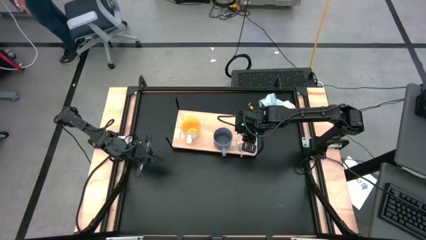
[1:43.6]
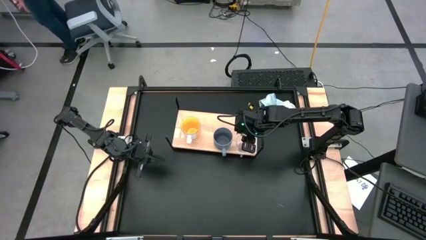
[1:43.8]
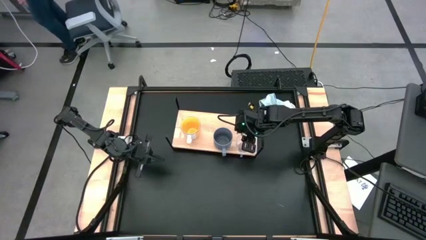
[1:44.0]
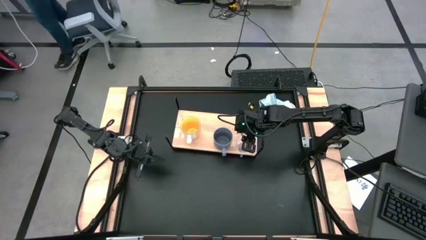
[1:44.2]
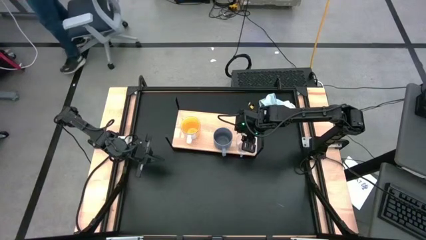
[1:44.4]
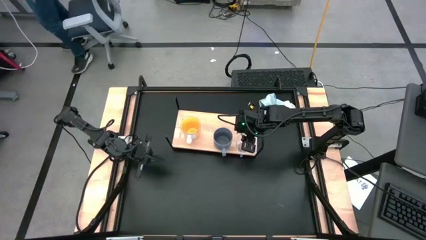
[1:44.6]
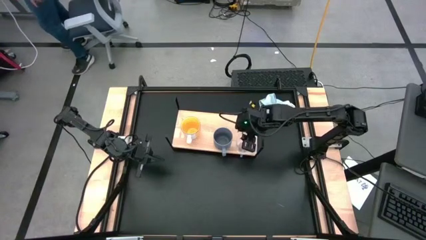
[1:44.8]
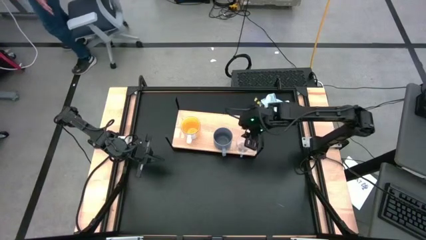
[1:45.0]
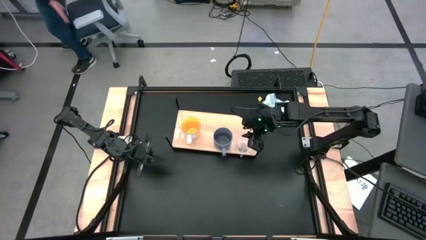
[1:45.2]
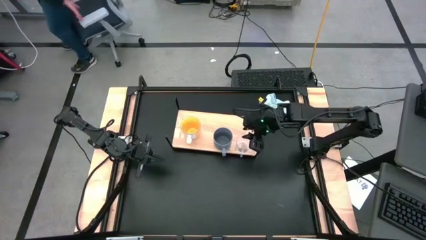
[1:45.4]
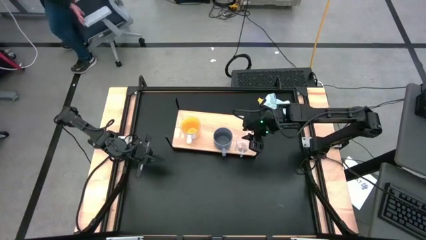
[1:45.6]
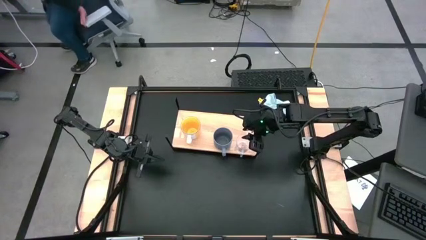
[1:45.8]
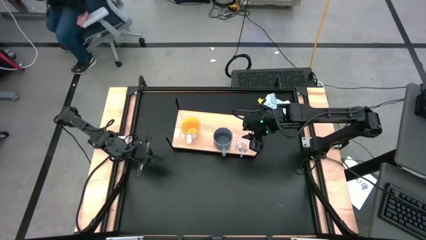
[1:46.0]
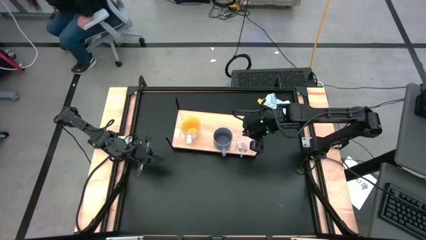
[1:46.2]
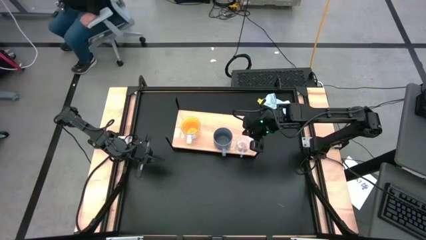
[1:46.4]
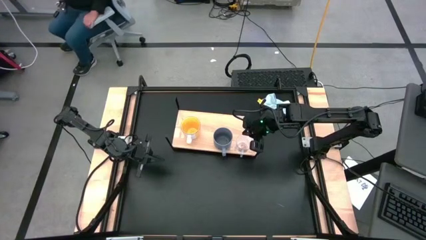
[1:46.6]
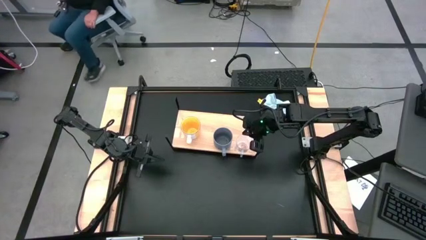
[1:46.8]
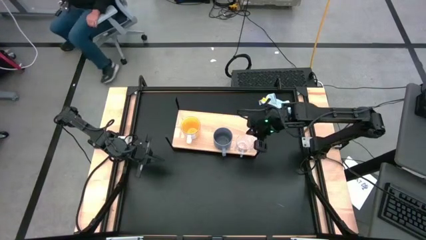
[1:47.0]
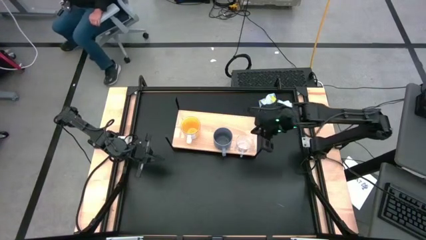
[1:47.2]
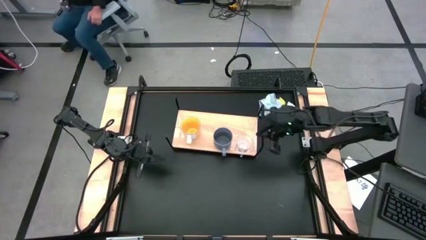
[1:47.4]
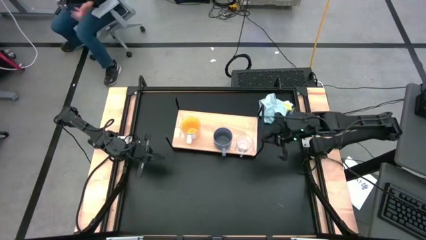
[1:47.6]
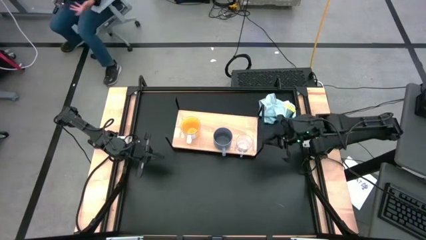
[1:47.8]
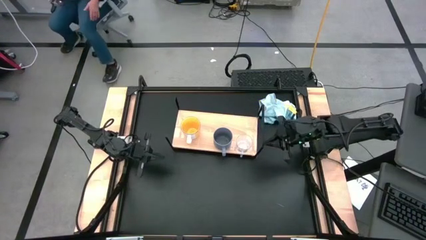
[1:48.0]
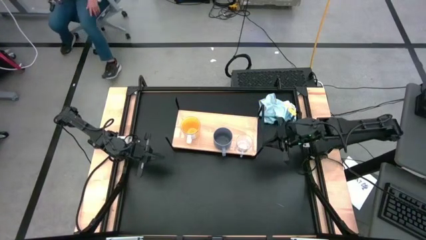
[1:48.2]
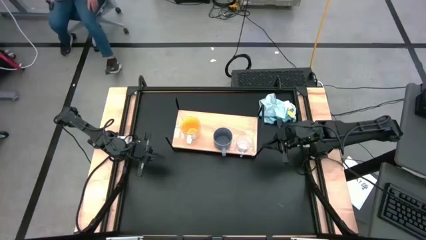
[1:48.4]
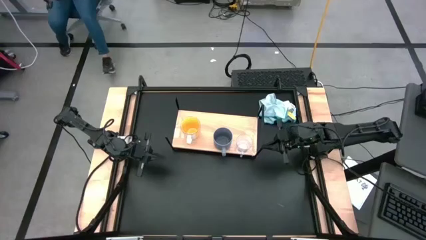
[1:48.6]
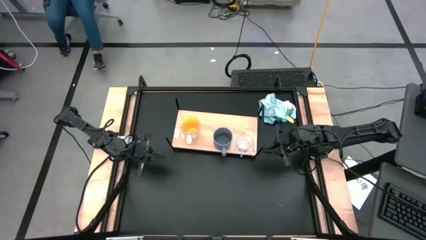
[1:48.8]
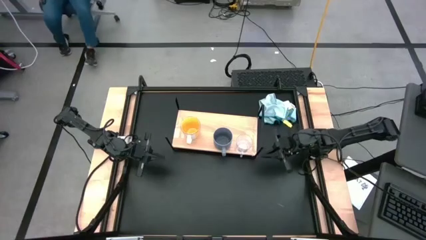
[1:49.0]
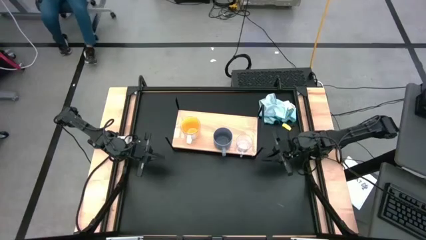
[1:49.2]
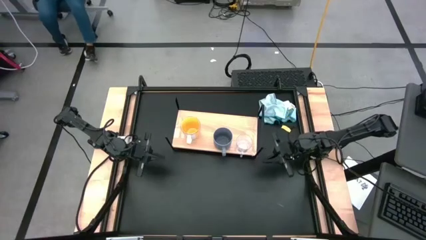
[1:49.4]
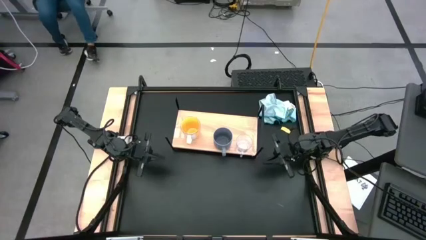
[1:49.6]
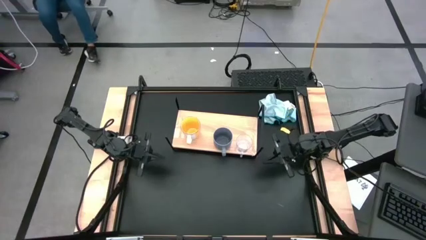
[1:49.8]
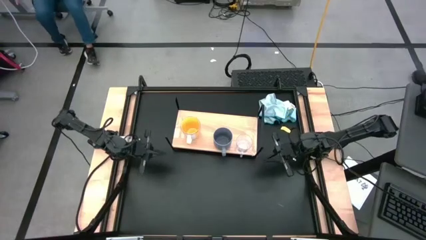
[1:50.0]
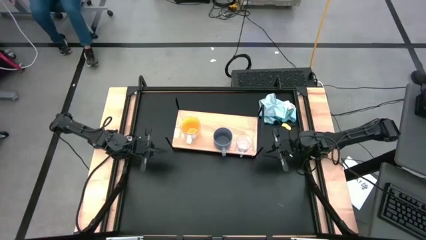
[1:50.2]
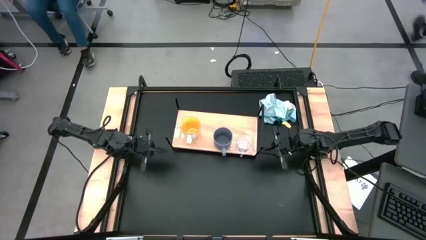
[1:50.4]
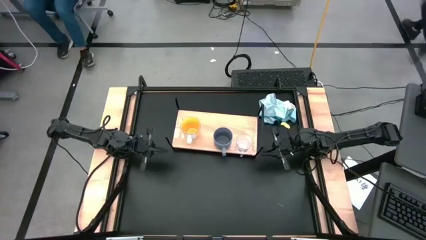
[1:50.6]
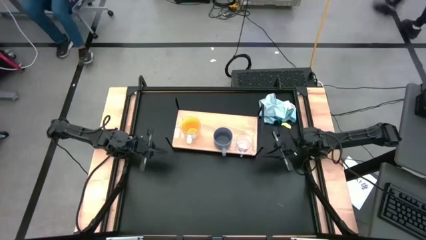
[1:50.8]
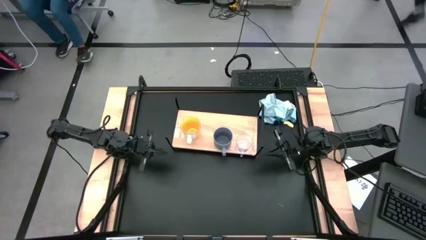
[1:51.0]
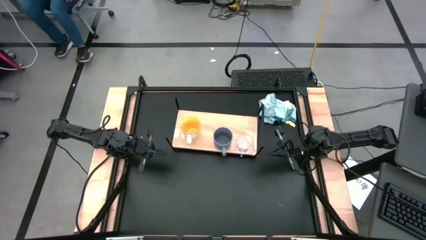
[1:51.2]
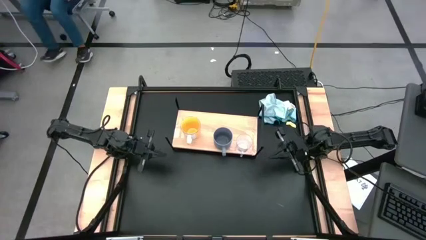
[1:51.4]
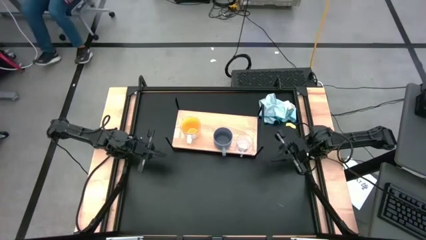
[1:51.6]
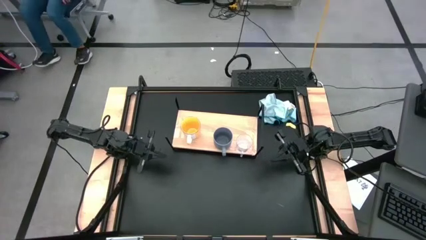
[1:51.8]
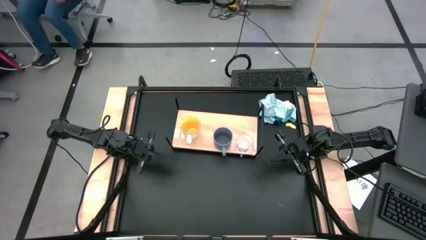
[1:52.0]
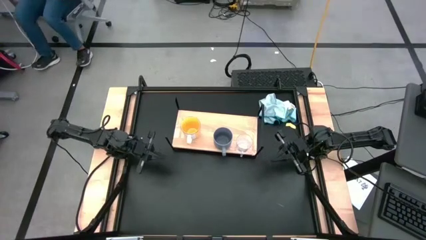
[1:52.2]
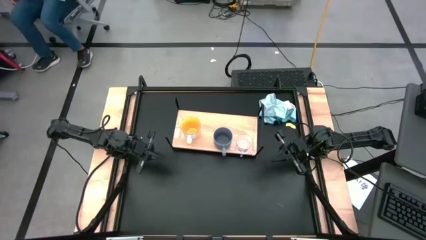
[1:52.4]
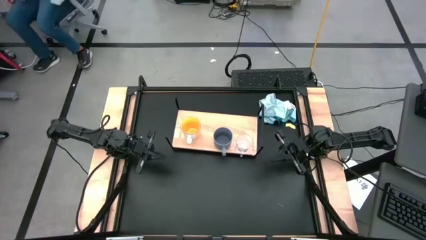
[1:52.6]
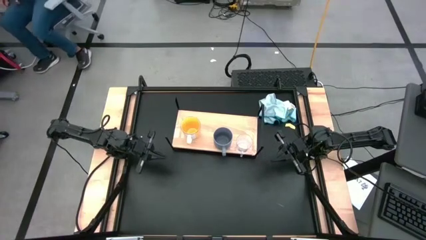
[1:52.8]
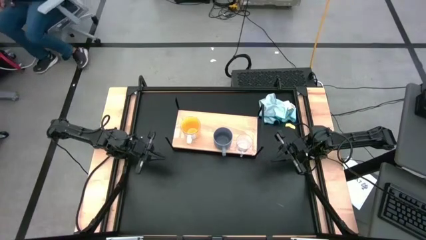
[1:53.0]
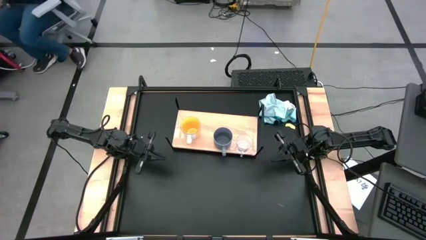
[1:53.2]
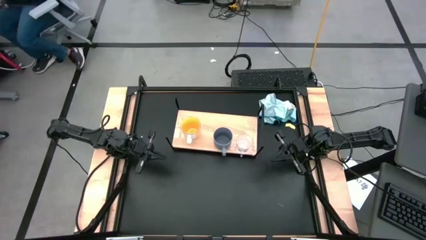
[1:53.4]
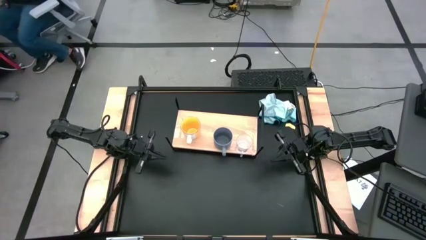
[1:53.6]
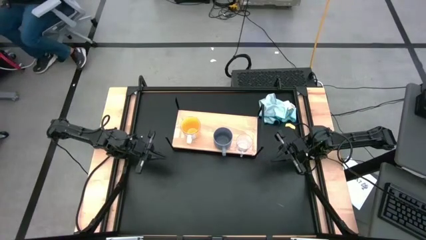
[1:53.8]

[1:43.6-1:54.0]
Task: Stack small to large cups/mugs on shelf
Return to Home Position
